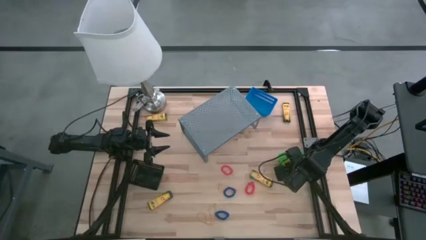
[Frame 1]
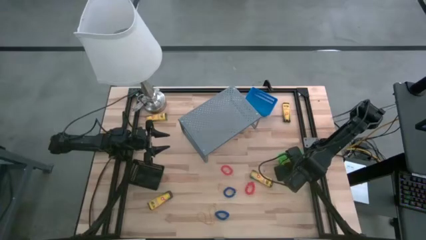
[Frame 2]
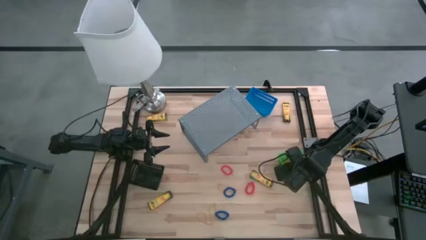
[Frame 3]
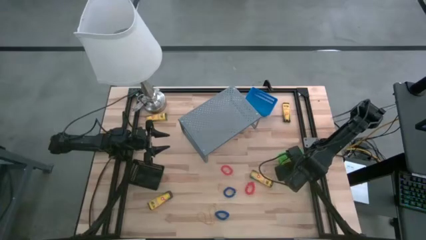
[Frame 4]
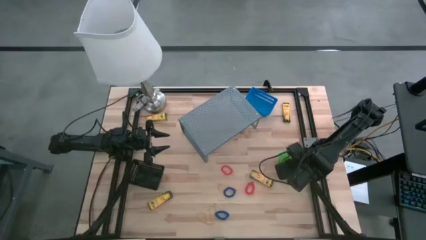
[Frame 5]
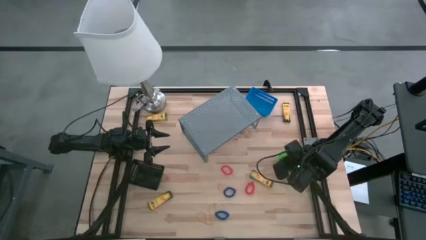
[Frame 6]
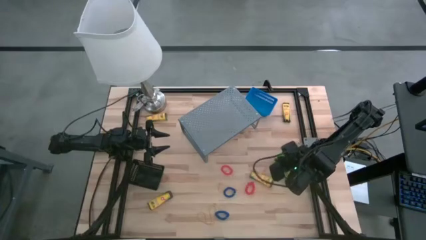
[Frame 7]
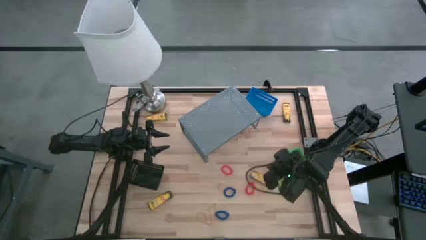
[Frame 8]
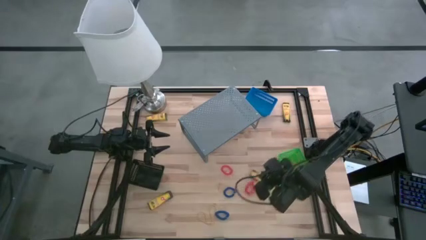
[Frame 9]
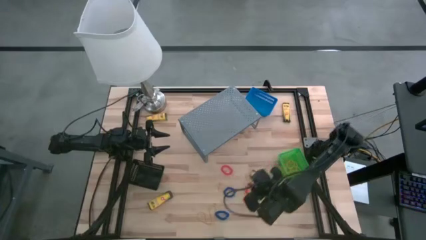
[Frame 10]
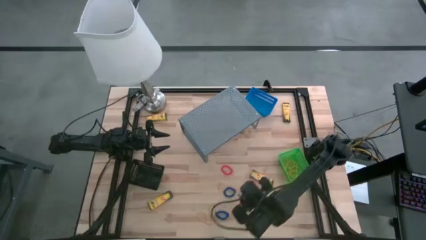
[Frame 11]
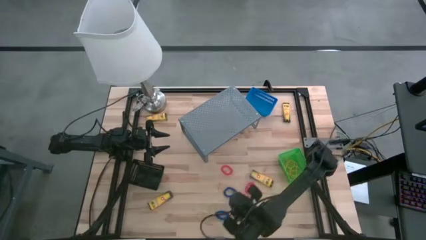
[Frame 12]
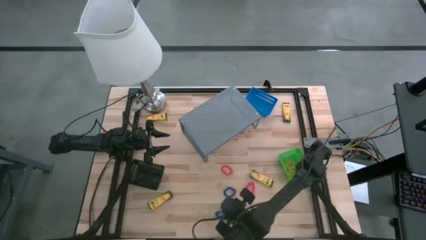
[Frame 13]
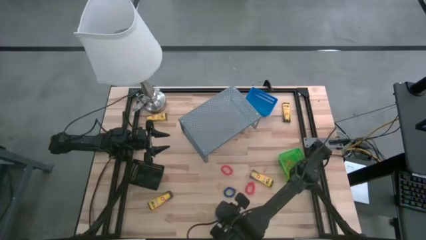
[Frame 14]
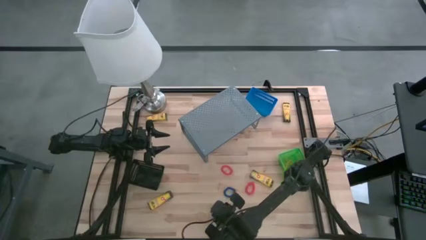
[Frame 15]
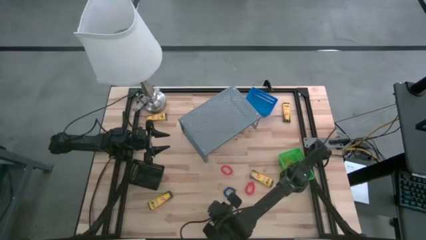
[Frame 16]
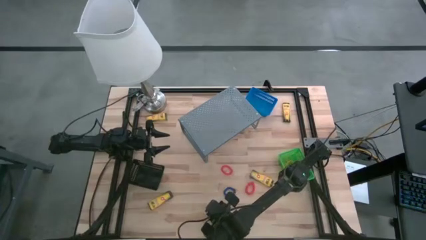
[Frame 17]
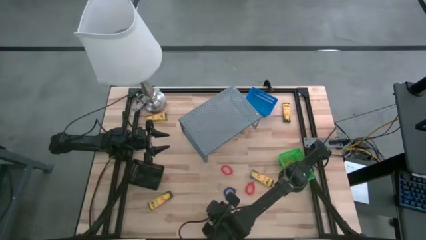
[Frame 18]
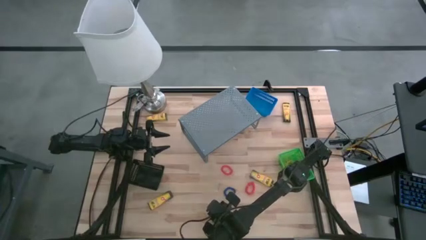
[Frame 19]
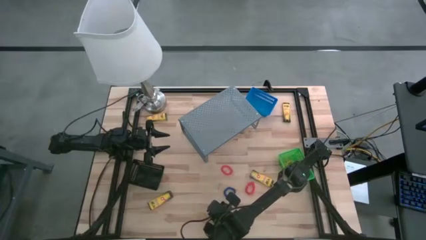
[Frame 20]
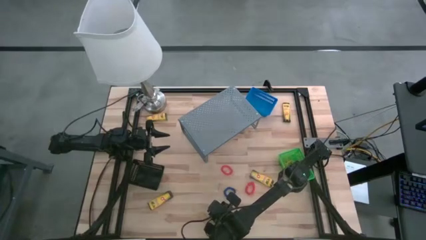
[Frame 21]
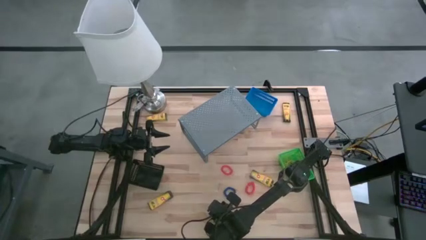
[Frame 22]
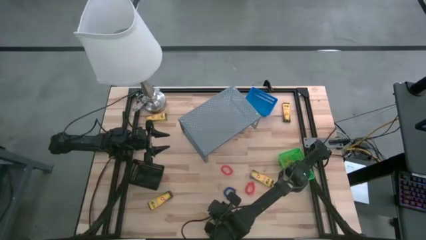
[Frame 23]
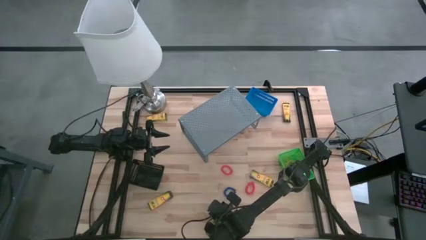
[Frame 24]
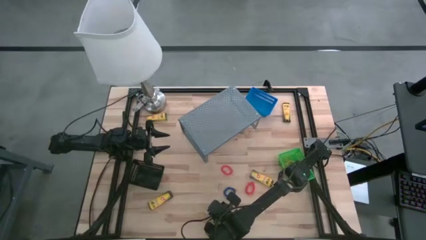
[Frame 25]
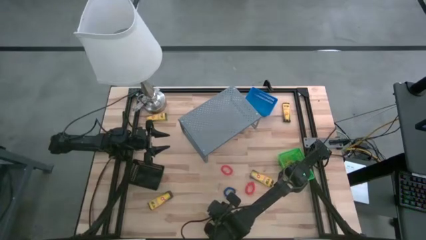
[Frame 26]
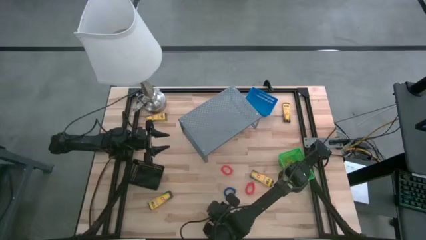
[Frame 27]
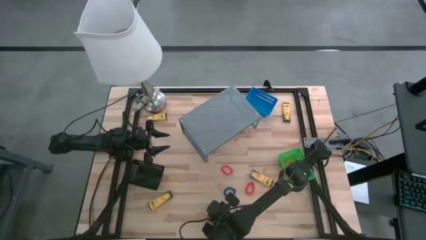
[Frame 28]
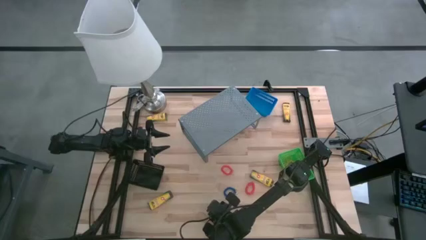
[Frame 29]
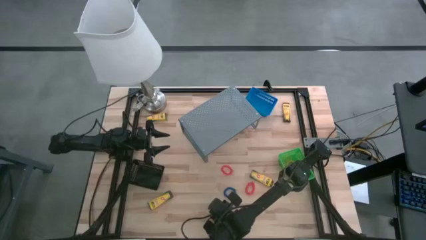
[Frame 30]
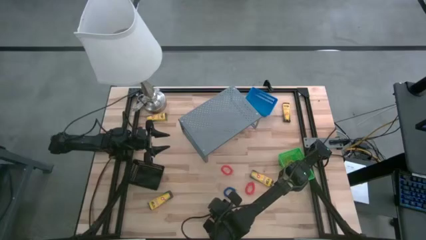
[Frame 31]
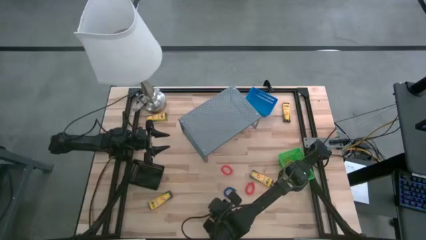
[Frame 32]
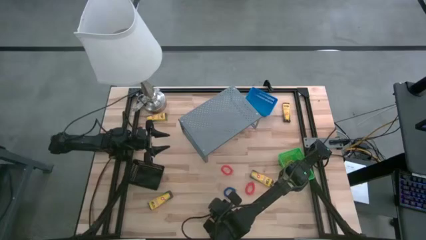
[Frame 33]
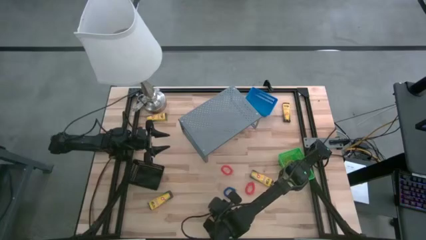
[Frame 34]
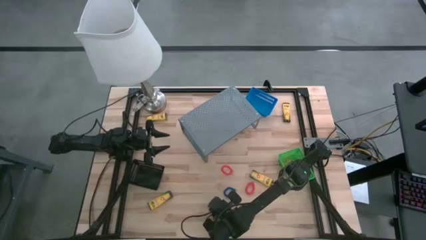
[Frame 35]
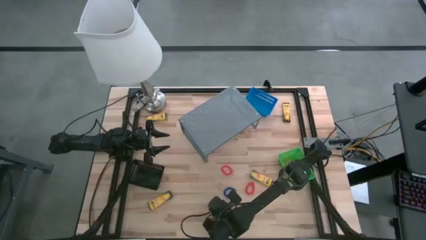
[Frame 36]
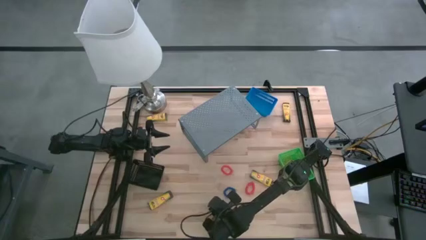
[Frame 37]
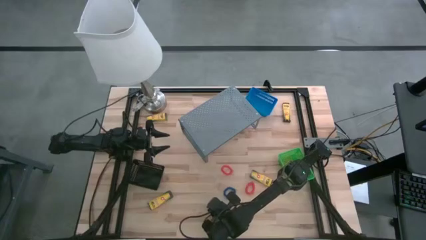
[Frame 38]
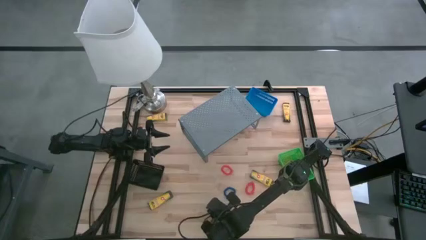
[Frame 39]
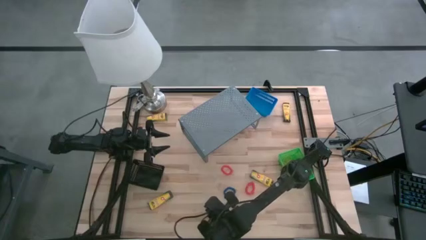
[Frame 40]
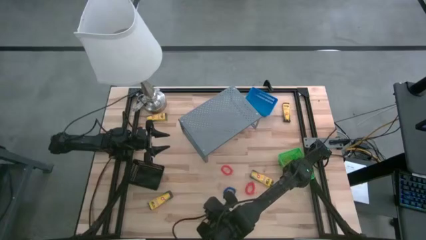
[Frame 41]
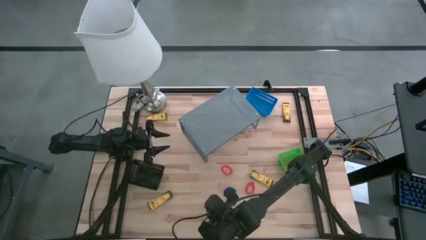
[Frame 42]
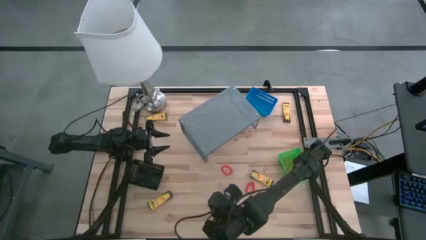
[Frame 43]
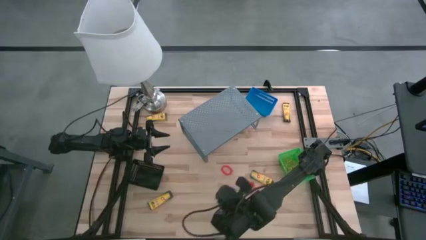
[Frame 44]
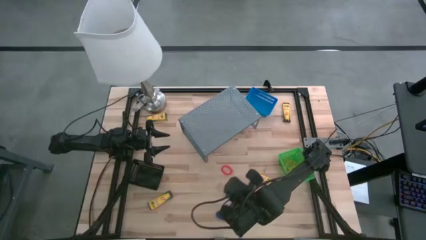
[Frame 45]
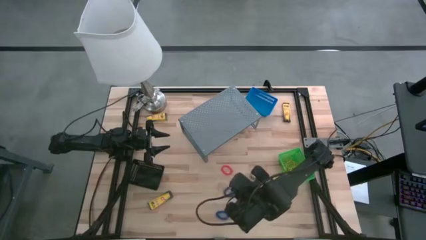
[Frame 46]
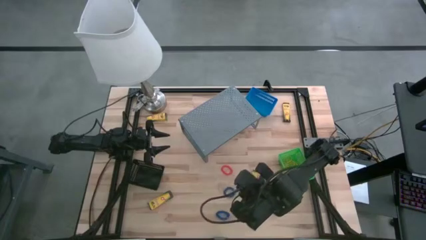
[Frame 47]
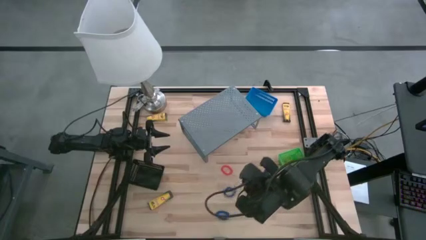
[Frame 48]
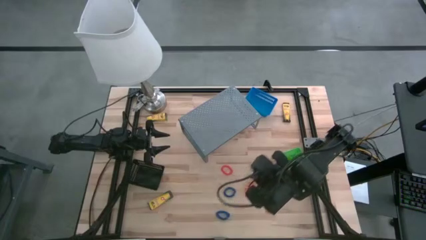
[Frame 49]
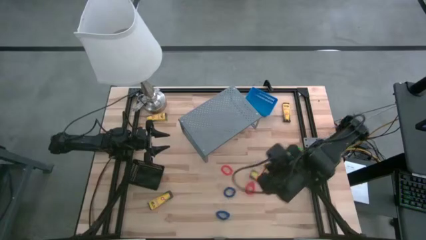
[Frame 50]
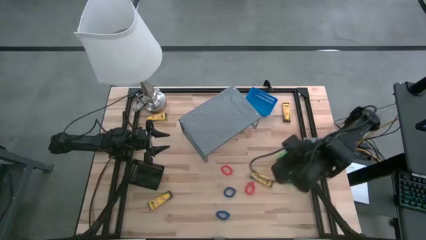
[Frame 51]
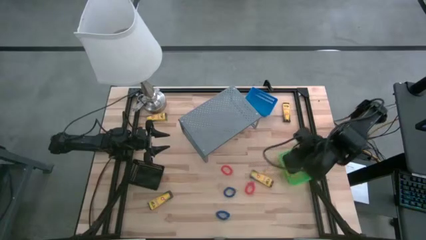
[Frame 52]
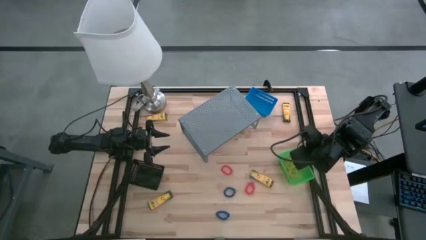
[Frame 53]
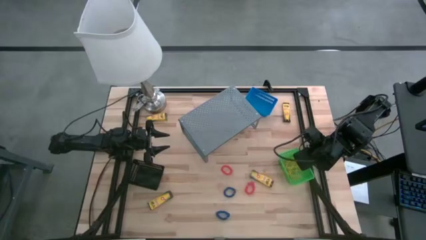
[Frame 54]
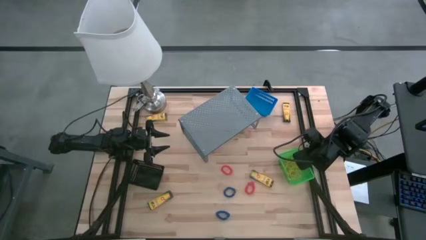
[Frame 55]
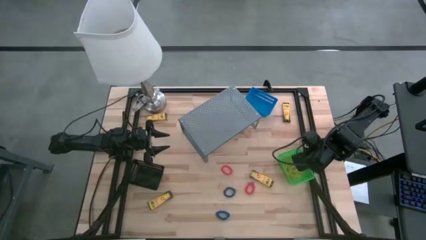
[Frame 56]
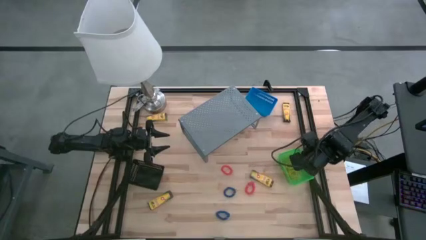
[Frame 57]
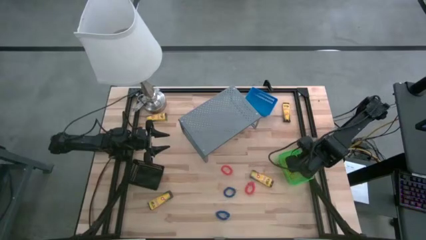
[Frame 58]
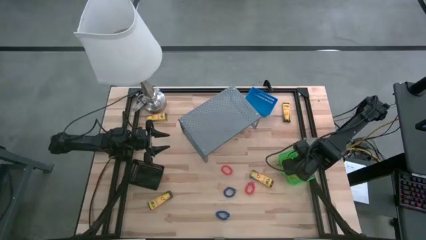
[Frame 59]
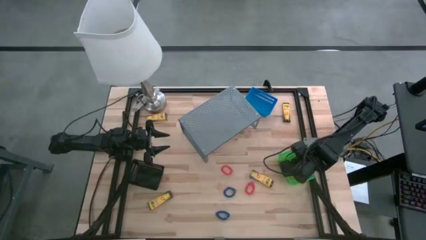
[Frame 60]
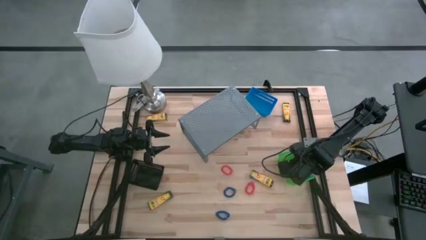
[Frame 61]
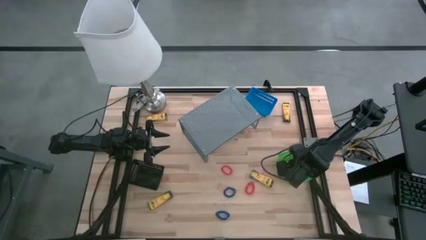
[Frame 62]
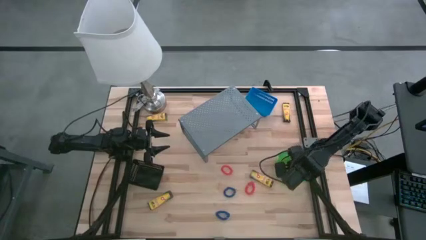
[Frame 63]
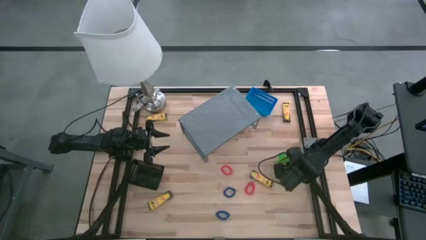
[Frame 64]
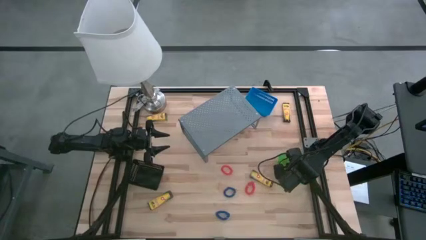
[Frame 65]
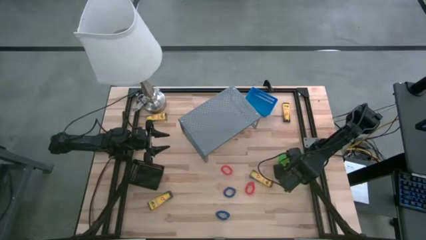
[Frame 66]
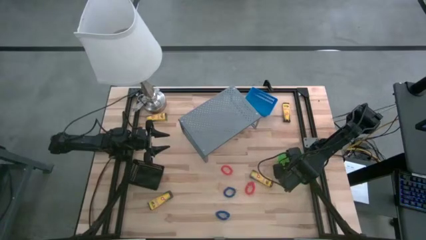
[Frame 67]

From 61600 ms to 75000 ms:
Task: Pick & Place Office Desk Supplies
Put the yellow rubber band into the green basket
